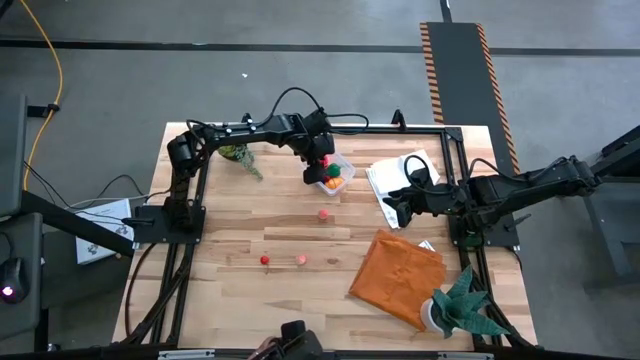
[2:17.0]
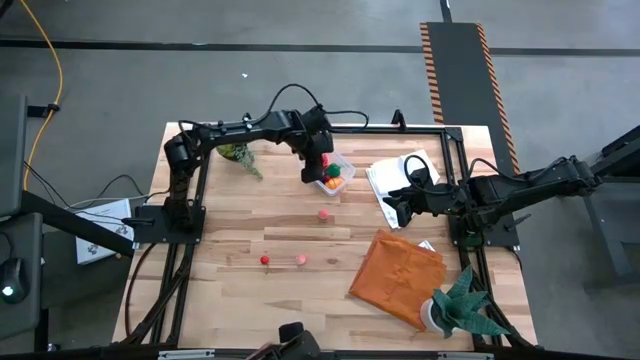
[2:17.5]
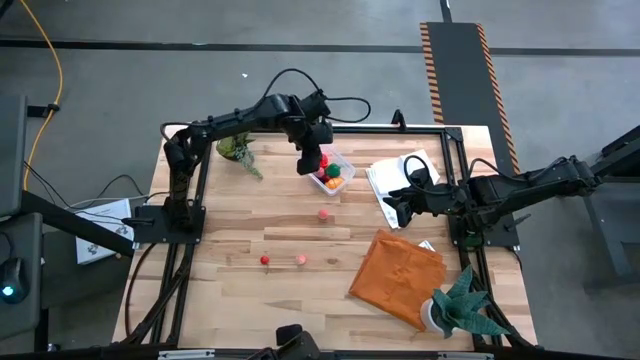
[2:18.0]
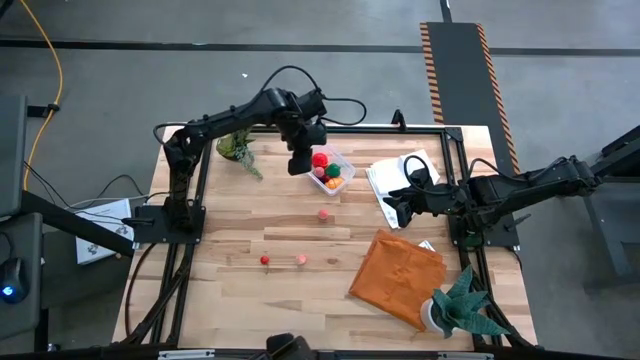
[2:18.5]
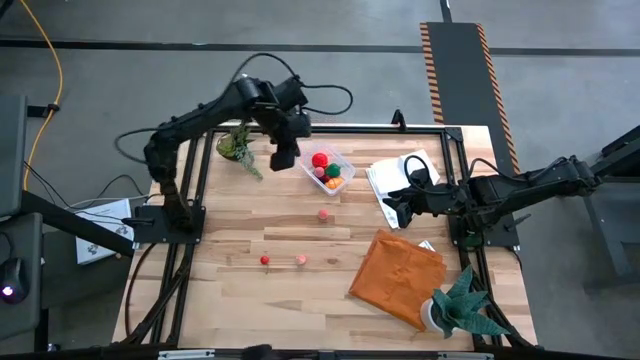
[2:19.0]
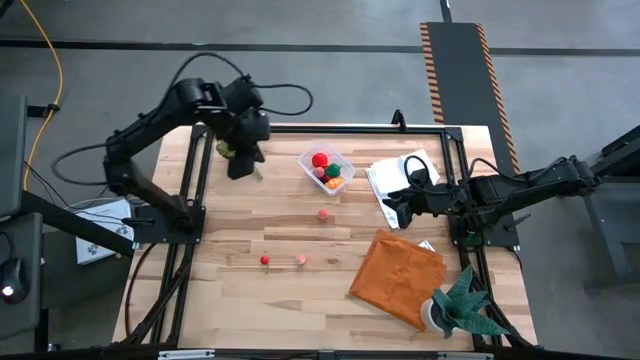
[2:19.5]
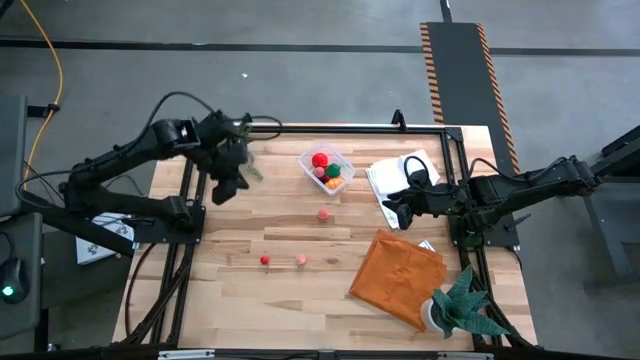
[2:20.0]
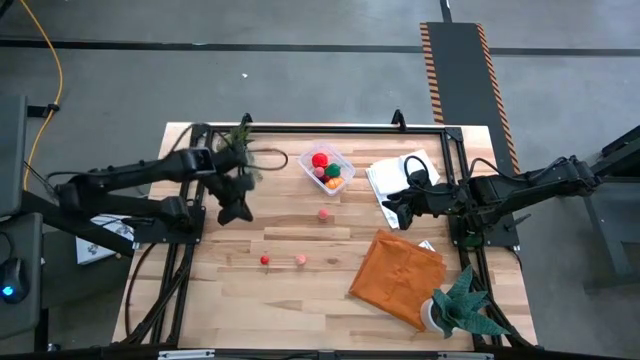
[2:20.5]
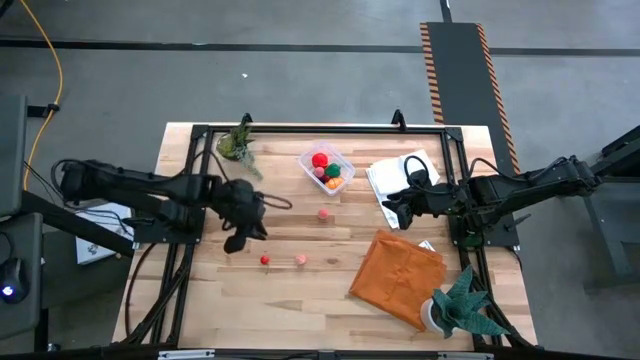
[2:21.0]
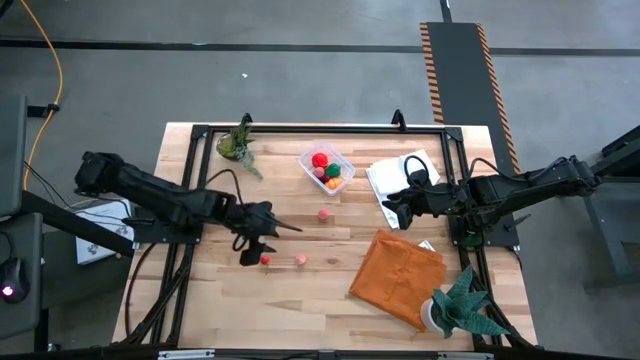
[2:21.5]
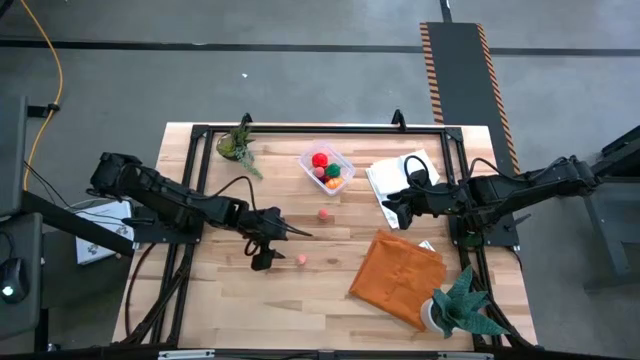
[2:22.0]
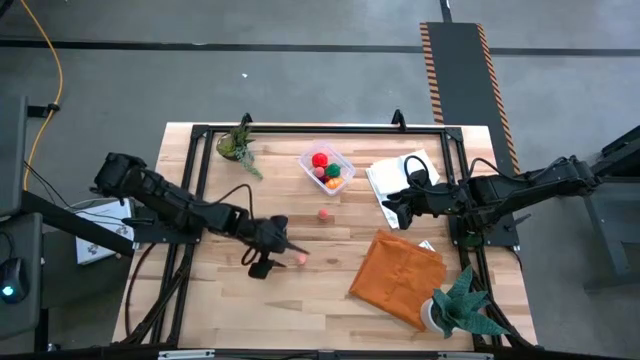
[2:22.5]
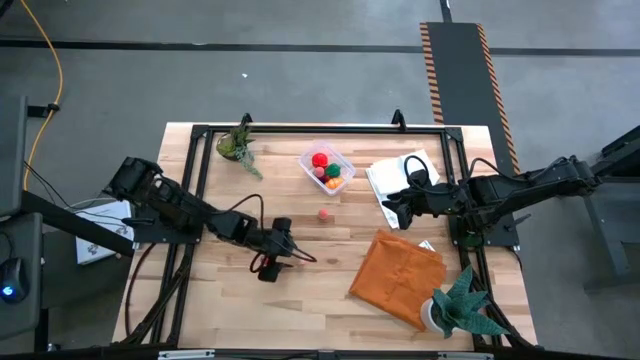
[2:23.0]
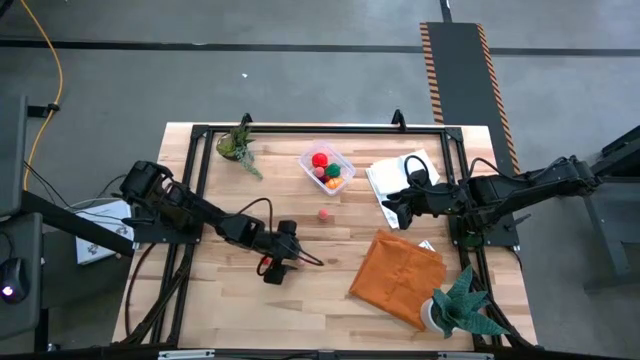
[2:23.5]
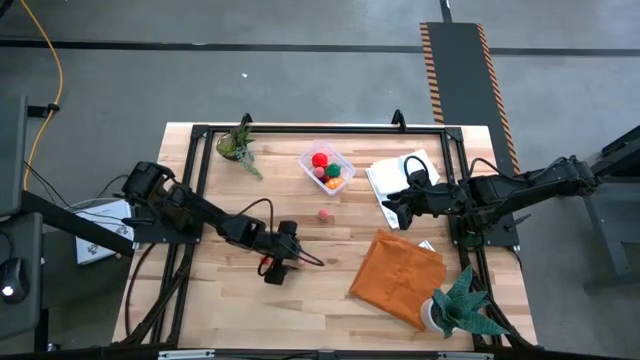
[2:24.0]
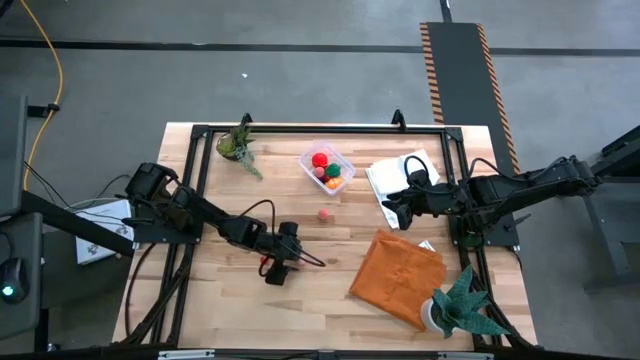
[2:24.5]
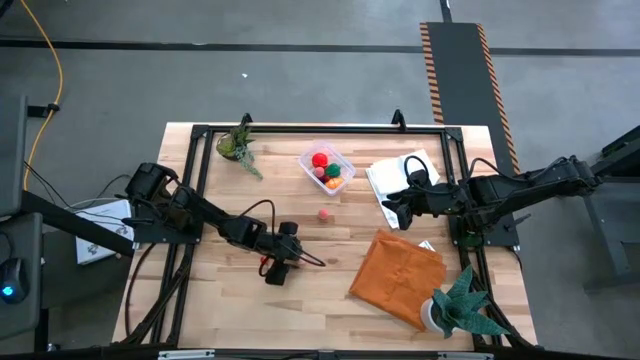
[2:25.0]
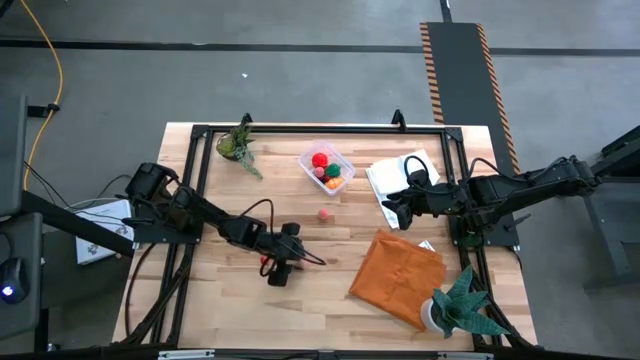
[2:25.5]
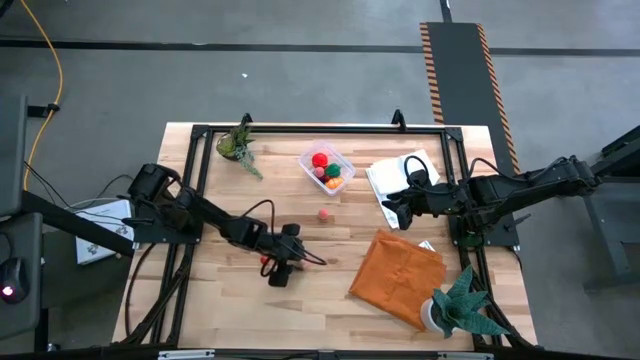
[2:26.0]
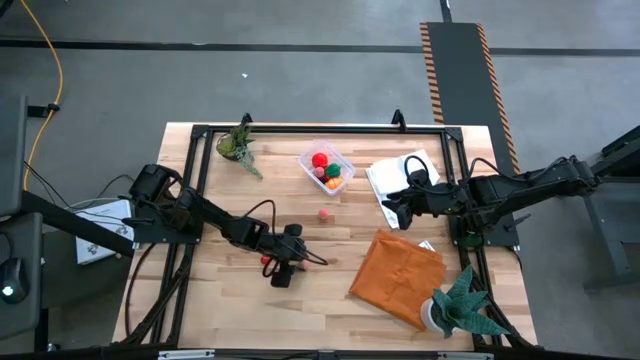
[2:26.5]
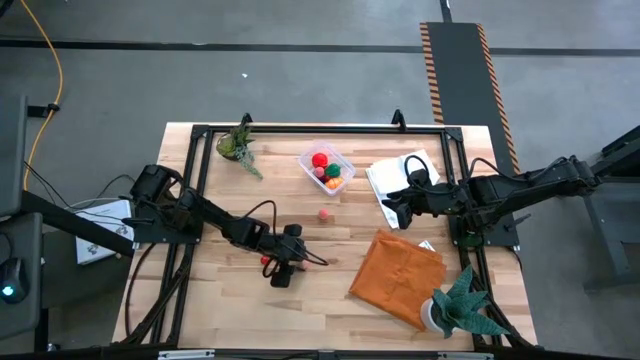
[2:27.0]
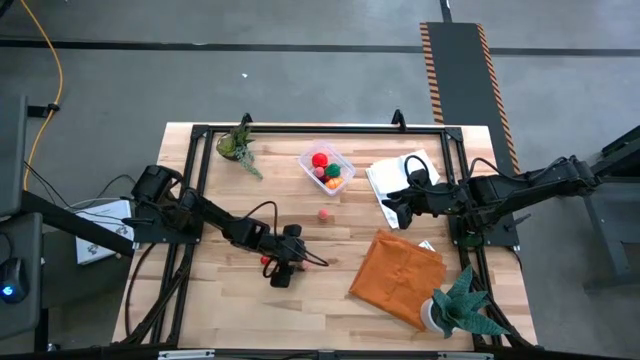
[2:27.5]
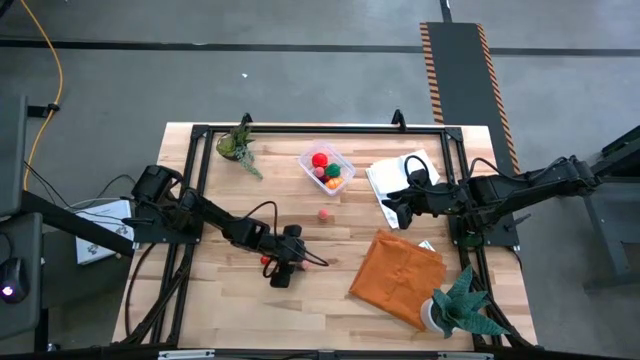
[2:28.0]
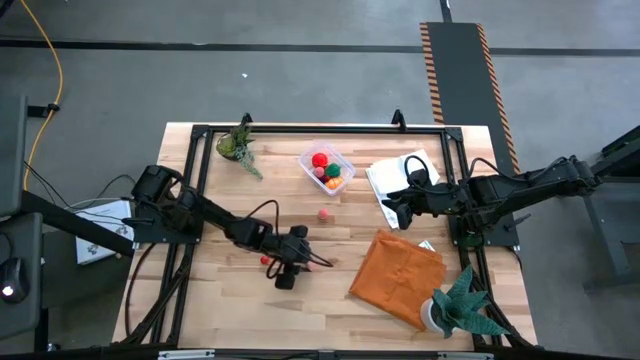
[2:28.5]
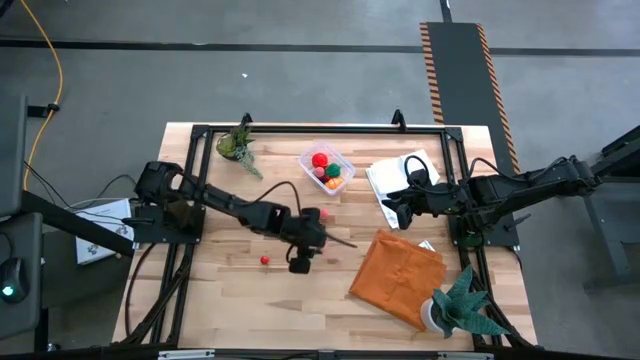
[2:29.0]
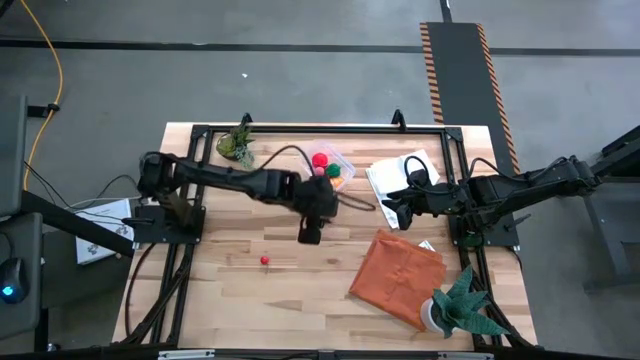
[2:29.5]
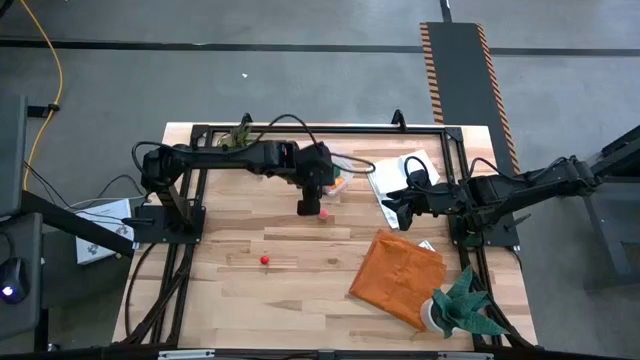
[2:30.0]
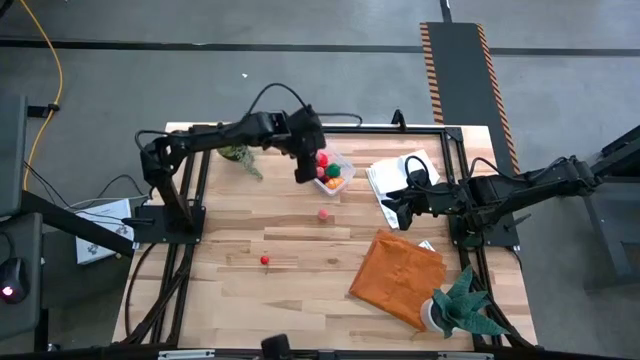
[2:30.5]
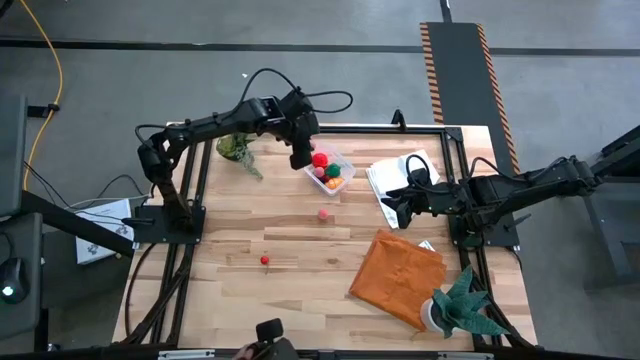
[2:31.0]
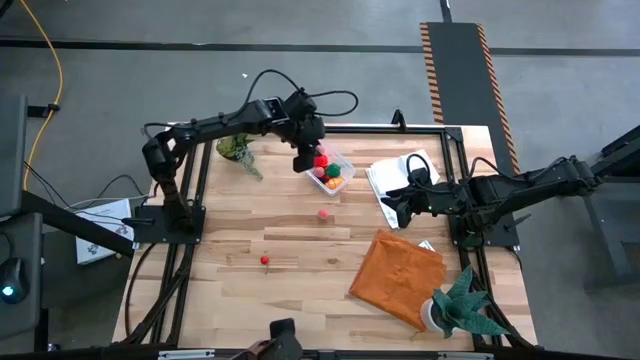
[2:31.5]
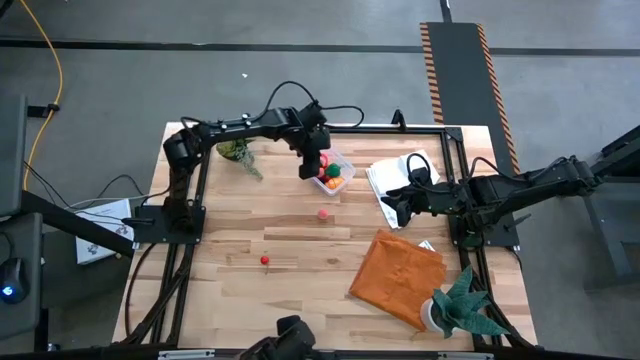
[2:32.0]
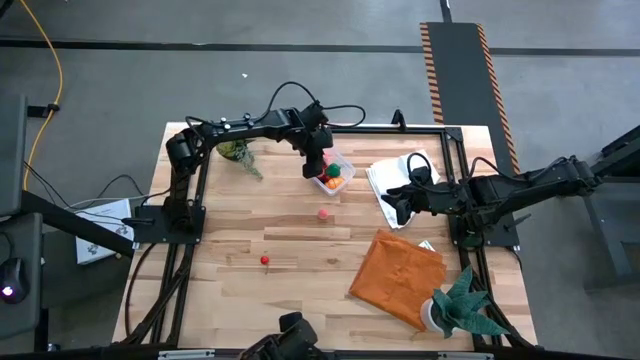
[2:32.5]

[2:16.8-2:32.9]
Task: Pick and placing Produce into tupperware
Put the bottom pink peach into the transparent bin

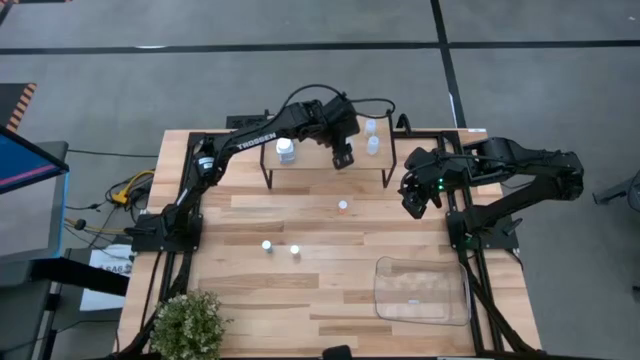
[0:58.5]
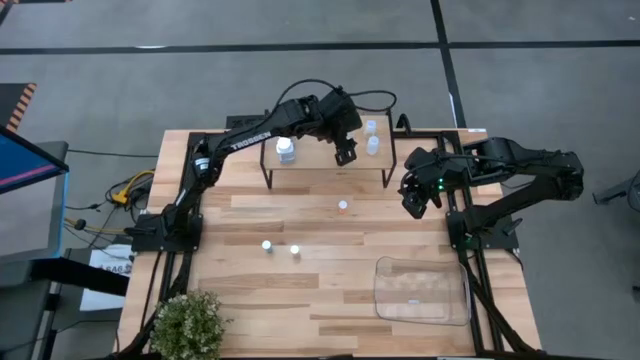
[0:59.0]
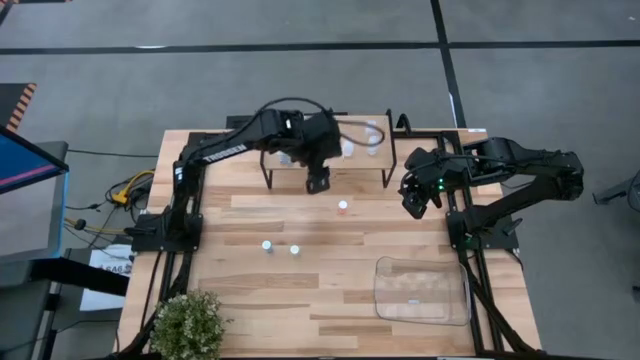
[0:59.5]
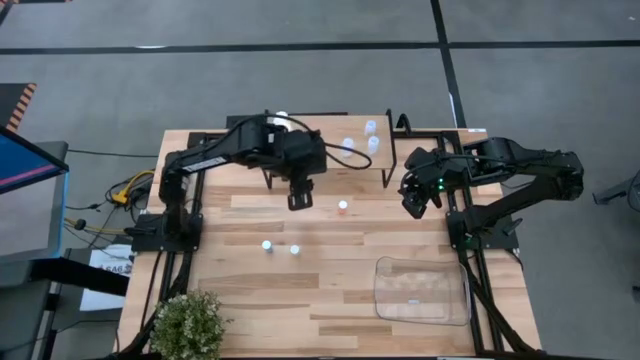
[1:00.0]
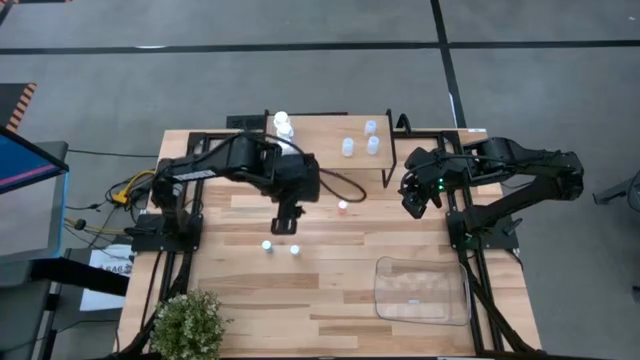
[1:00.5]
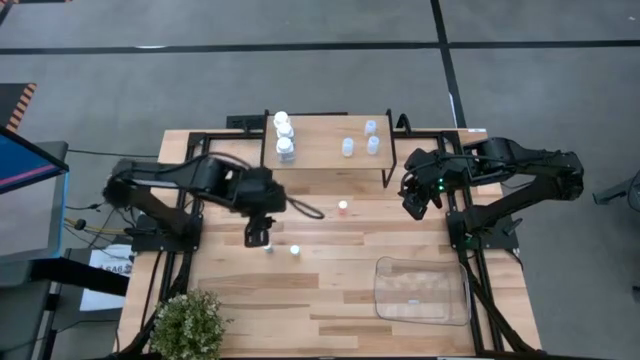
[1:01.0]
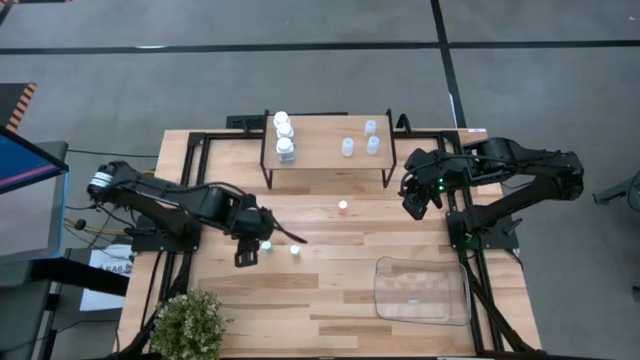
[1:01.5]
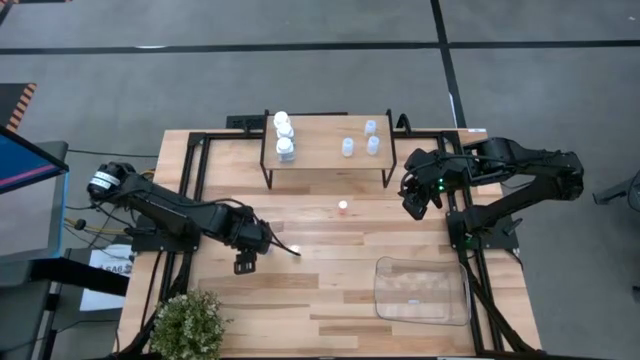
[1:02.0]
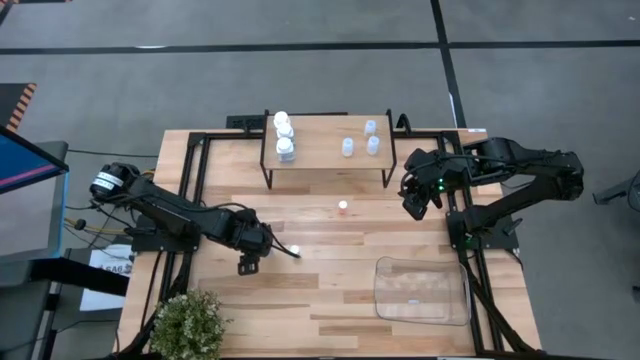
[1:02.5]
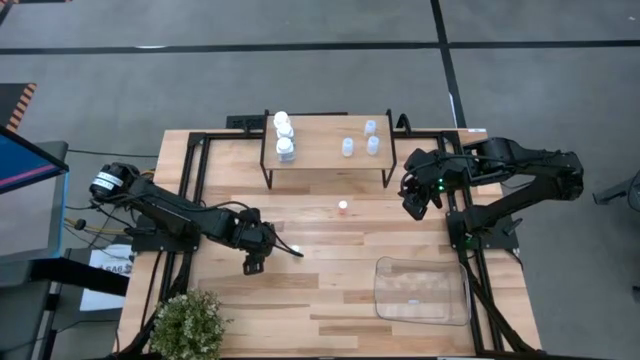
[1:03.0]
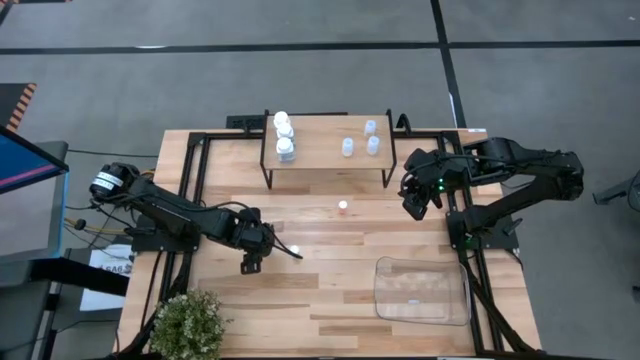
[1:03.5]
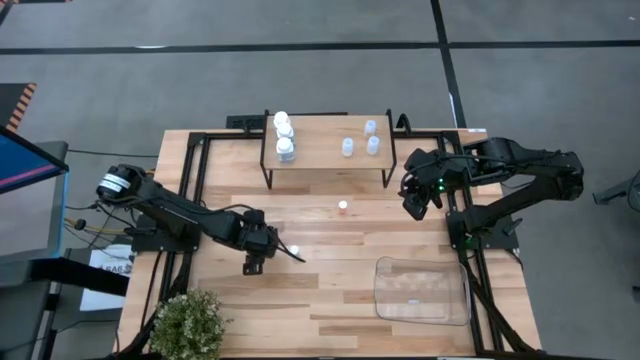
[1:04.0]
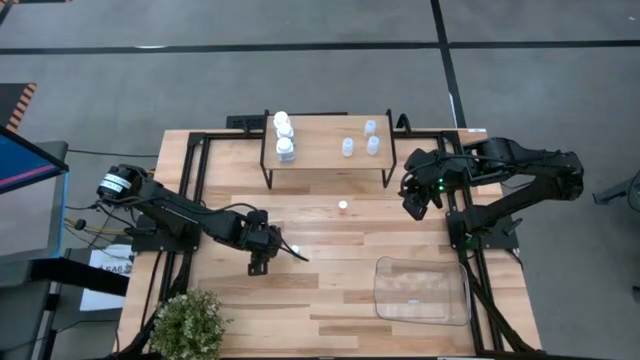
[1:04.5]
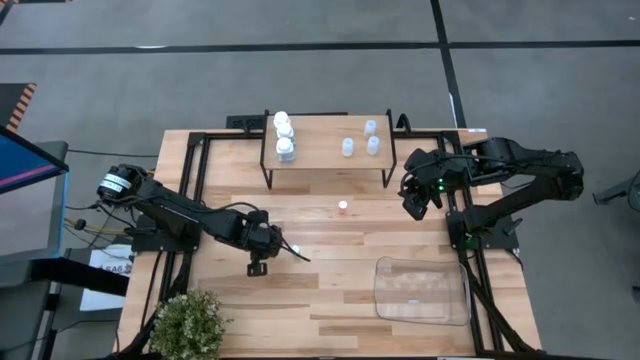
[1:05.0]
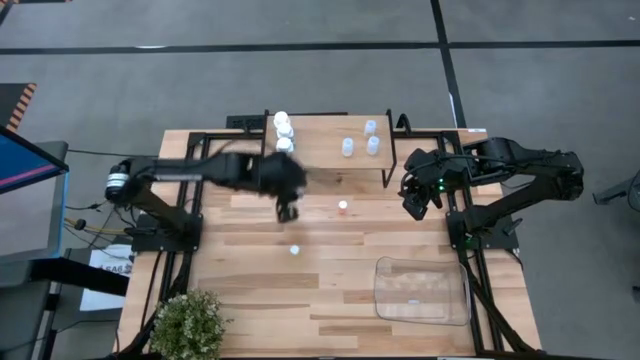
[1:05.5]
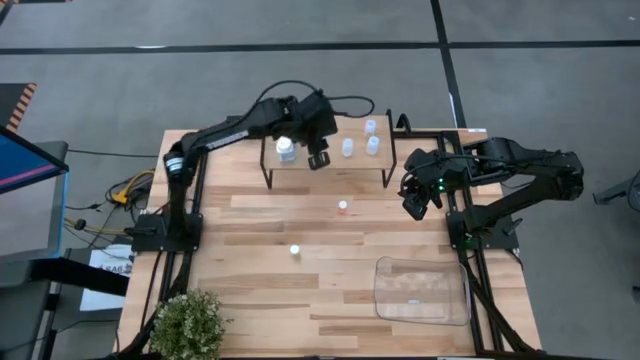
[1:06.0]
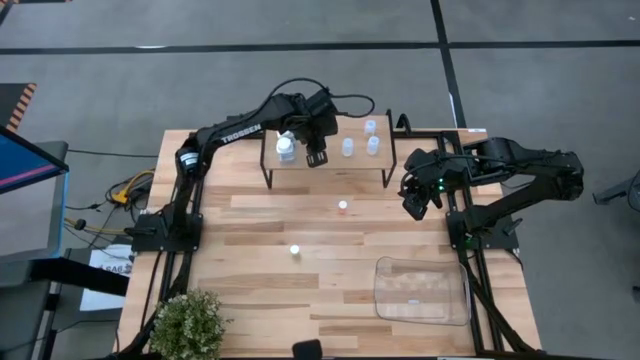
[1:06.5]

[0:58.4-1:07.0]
Task: Pick and place medicine bottles onto shelf by color
Put the blue pill bottle on the shelf
